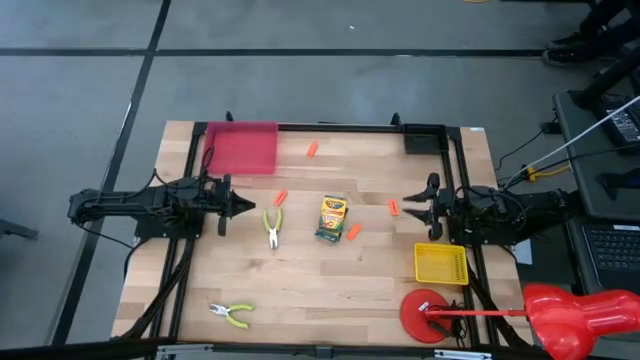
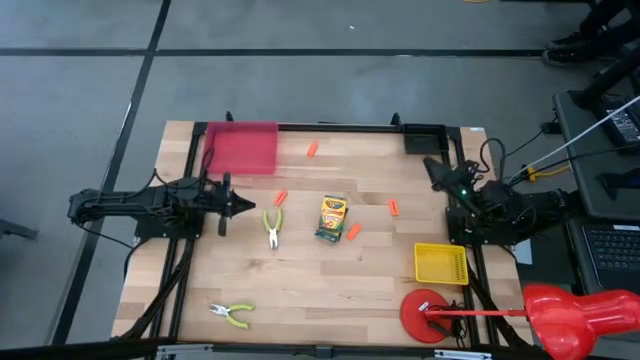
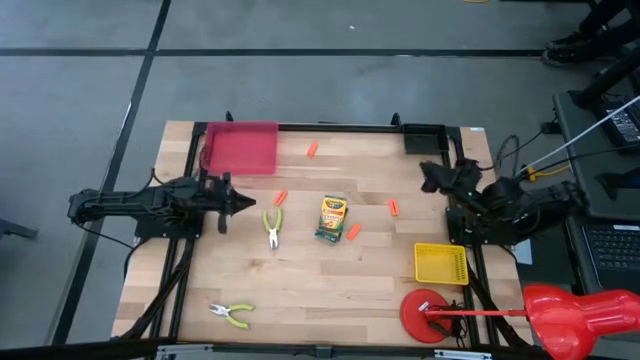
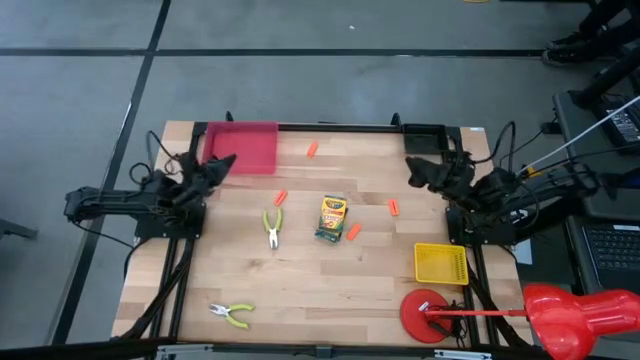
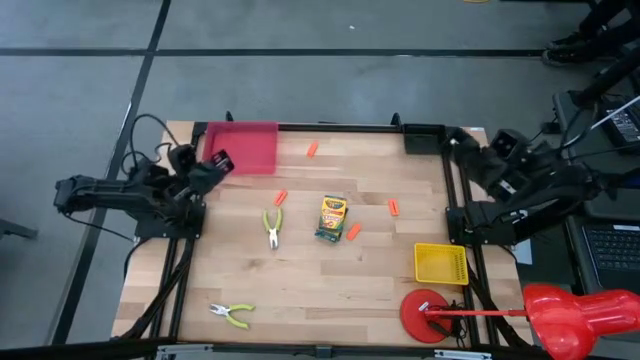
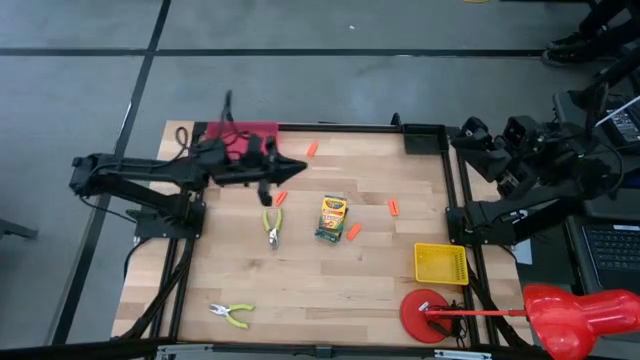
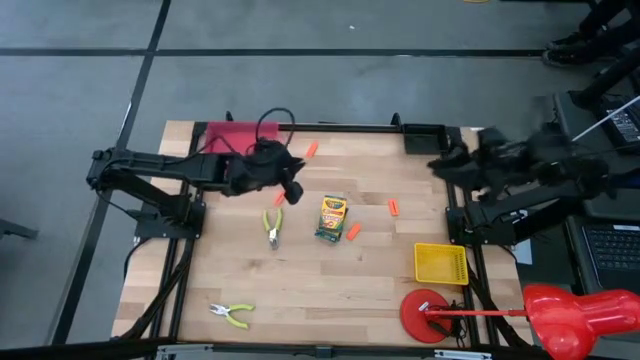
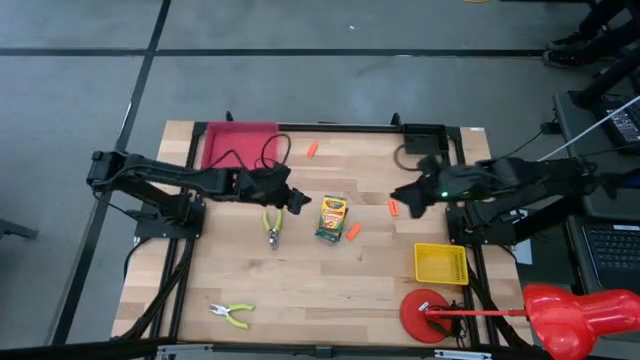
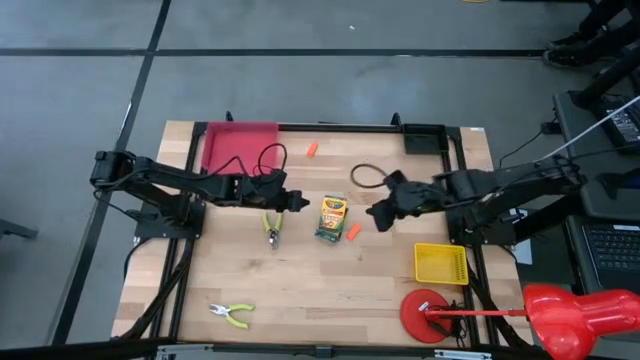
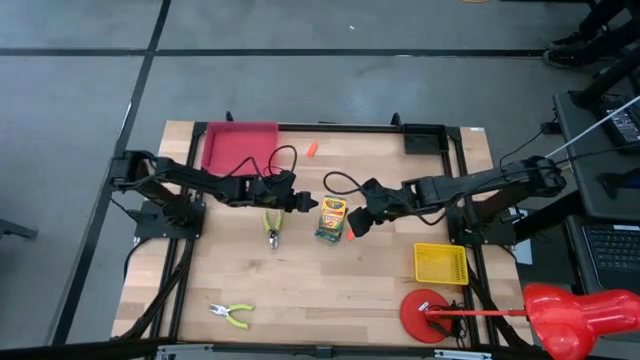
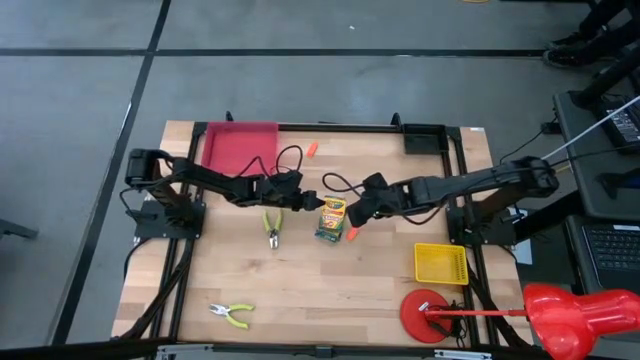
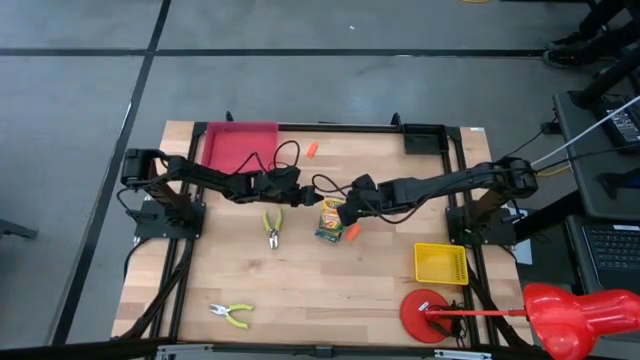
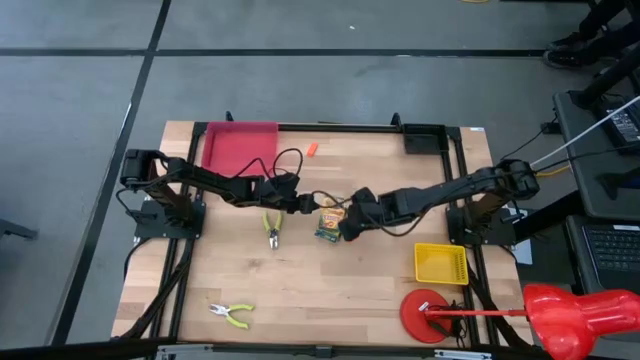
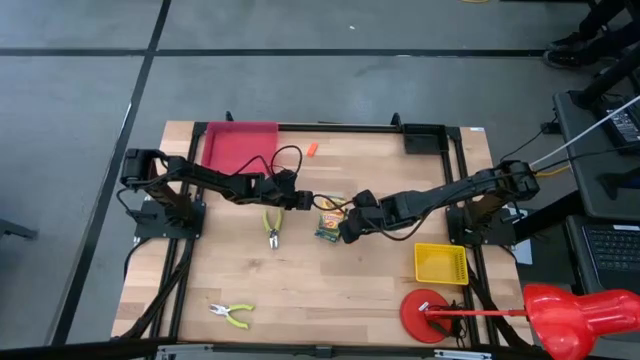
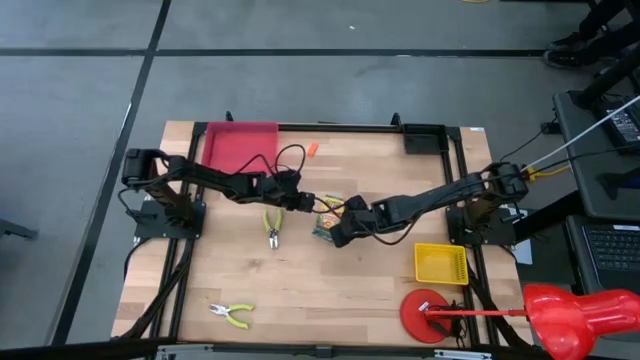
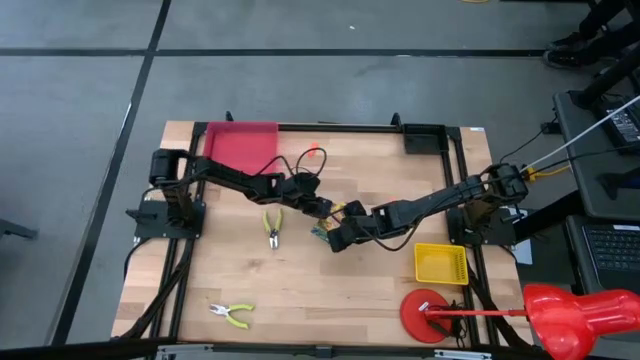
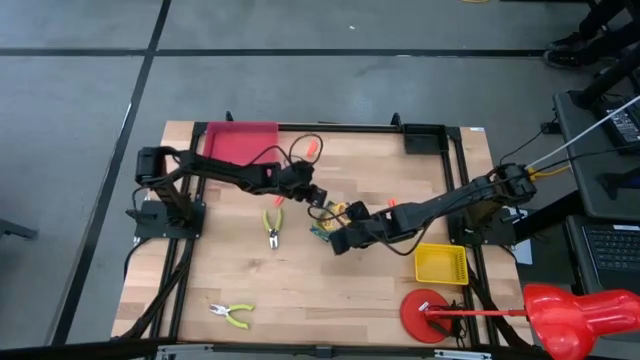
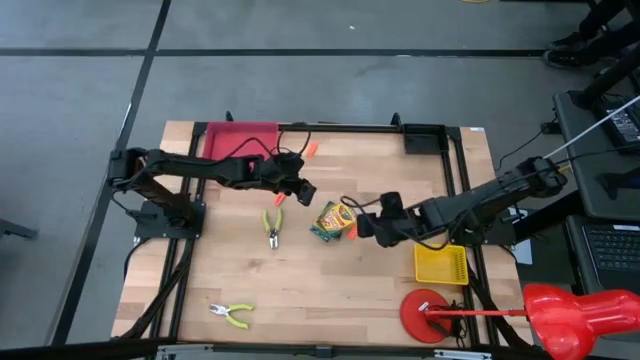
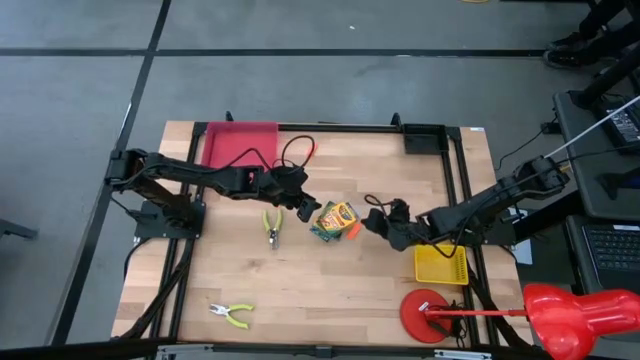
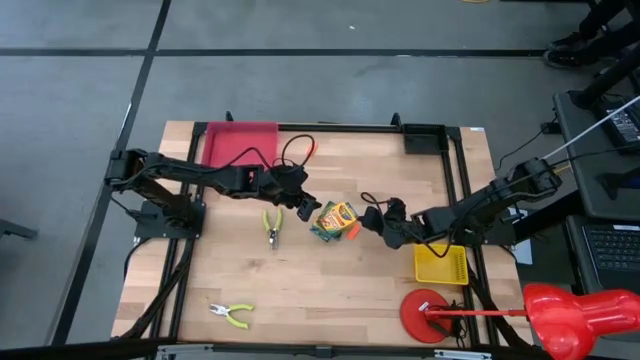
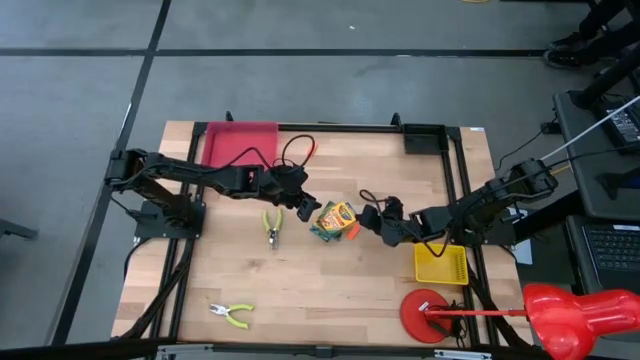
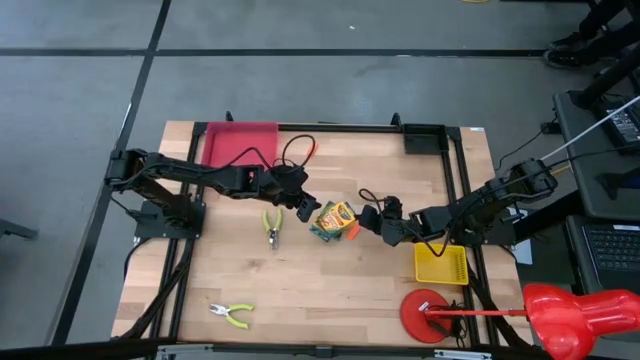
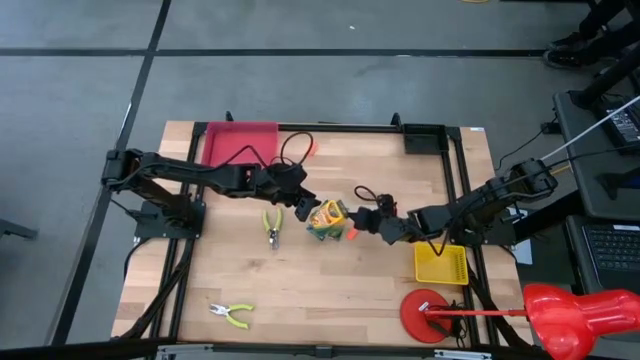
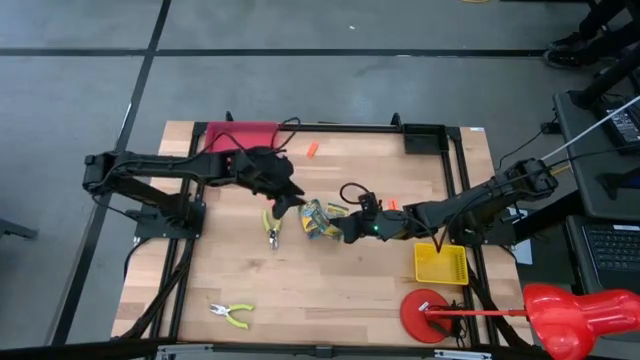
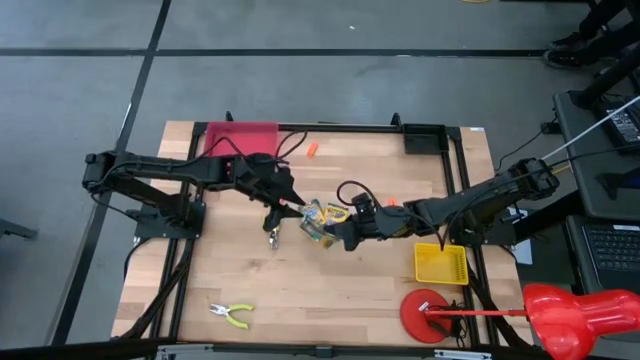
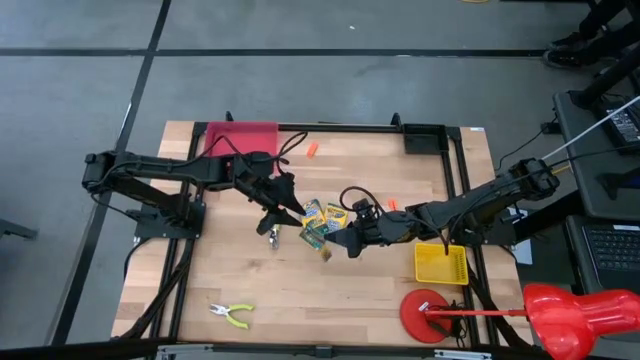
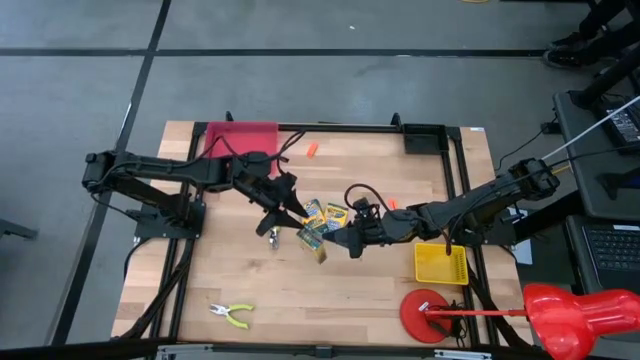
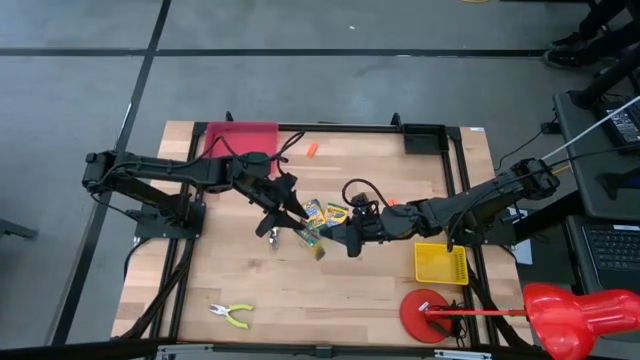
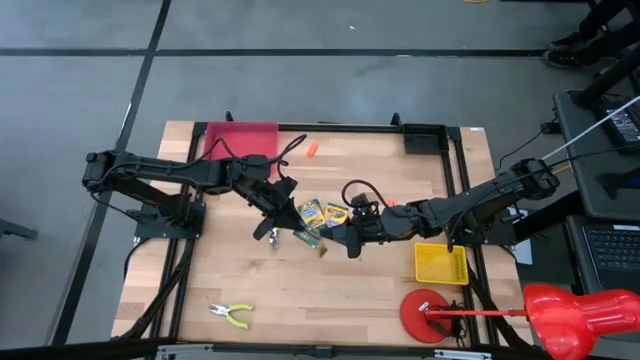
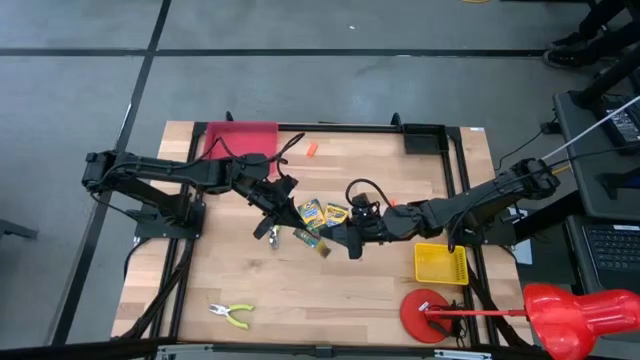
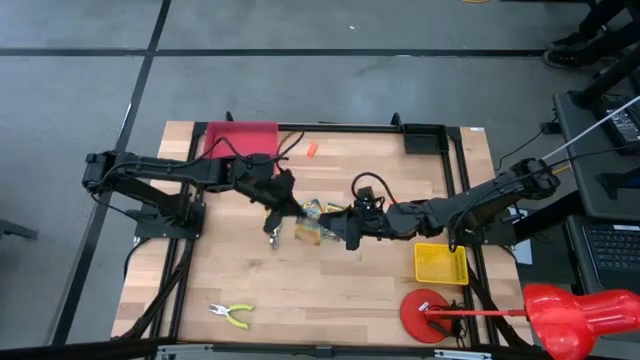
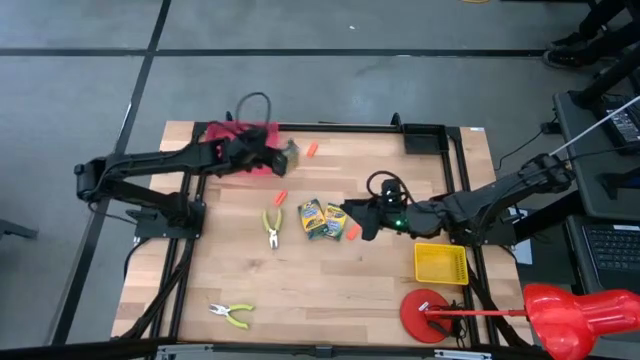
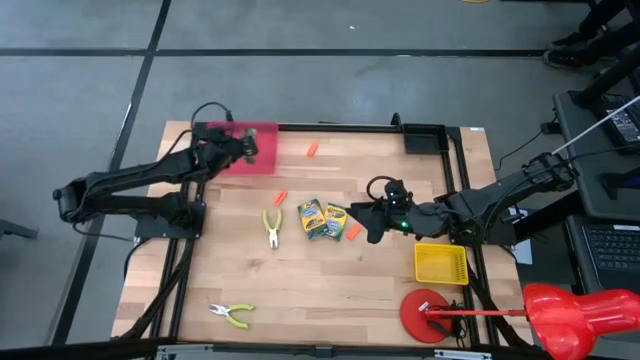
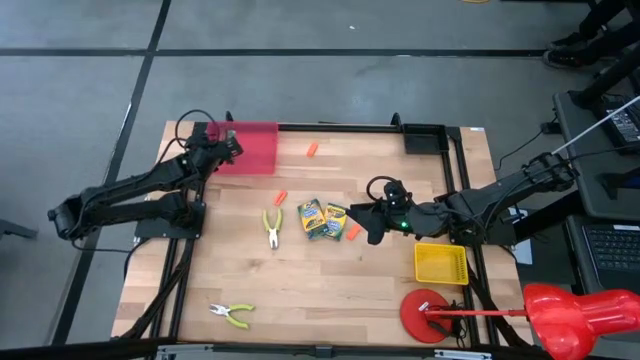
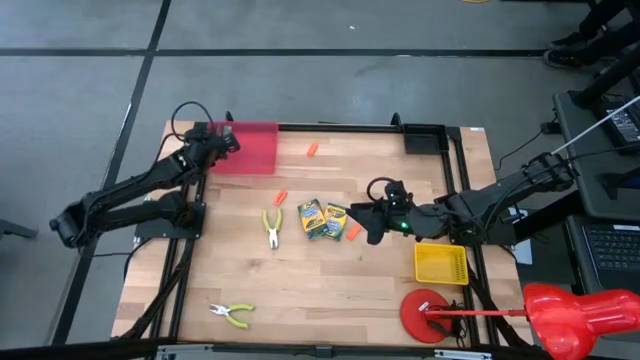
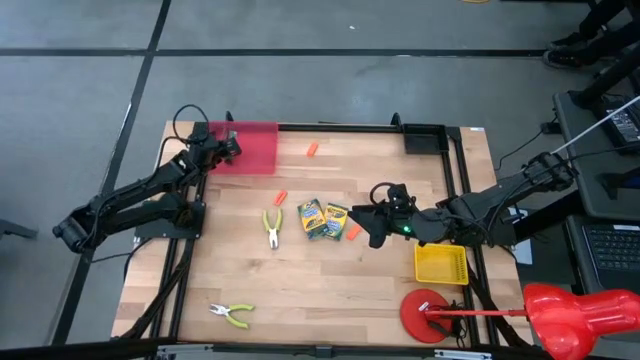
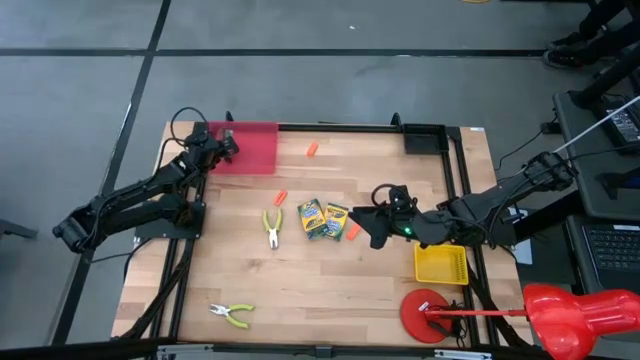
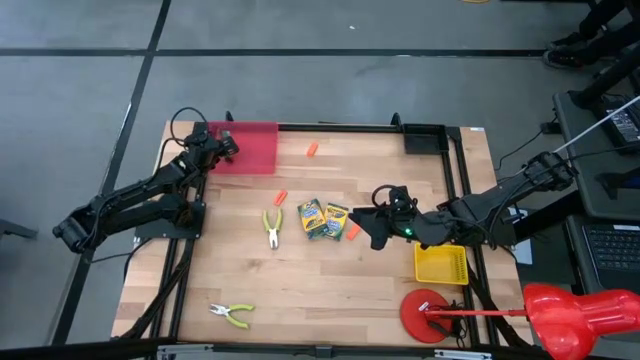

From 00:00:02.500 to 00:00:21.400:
Task: Pick & Place School Supplies
Put the yellow crayon box into the pink bin
